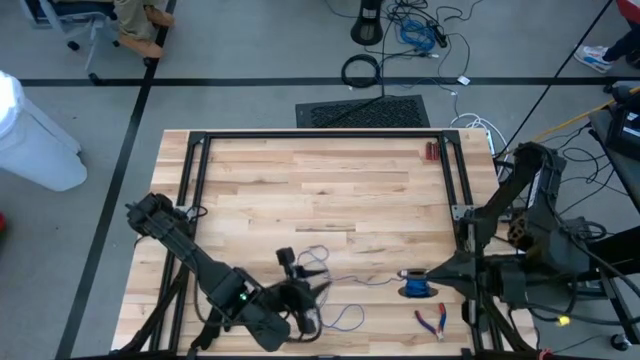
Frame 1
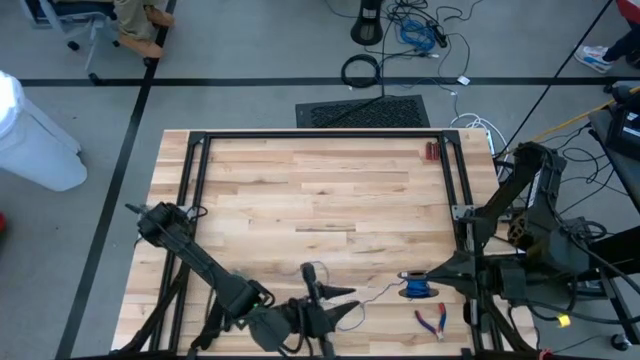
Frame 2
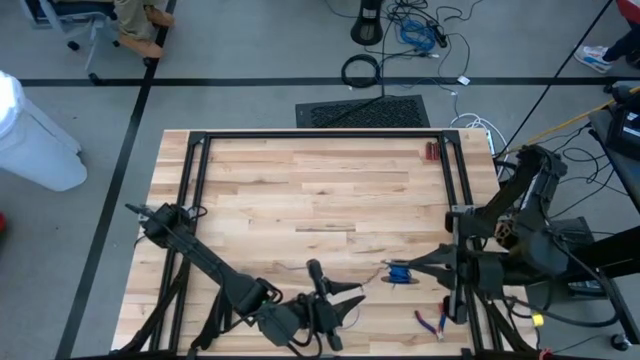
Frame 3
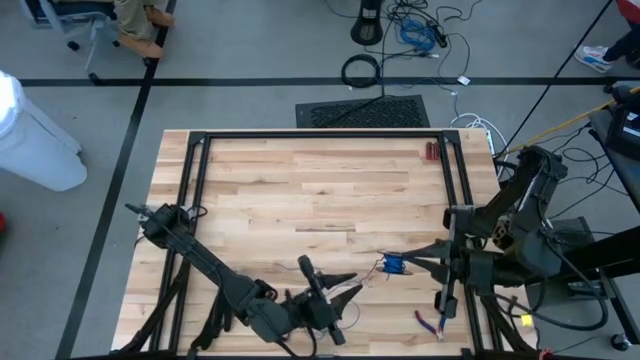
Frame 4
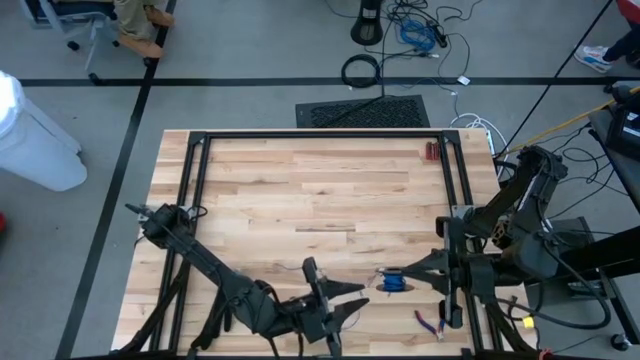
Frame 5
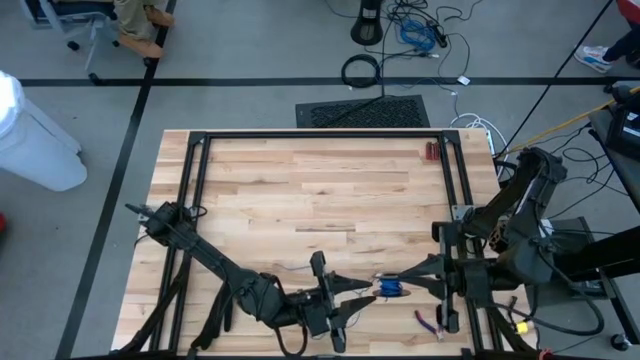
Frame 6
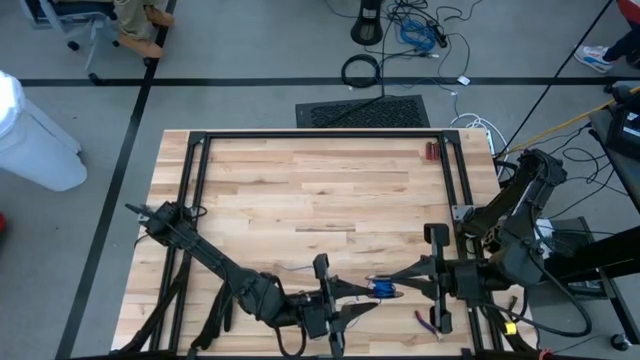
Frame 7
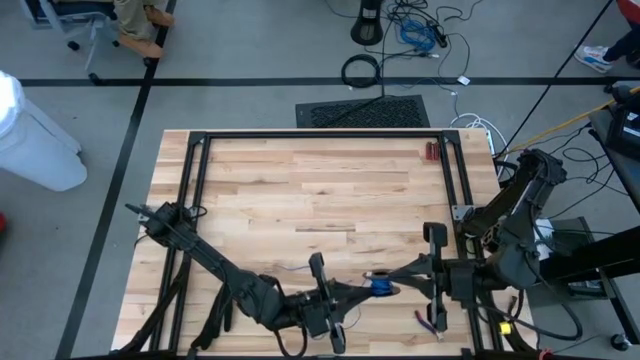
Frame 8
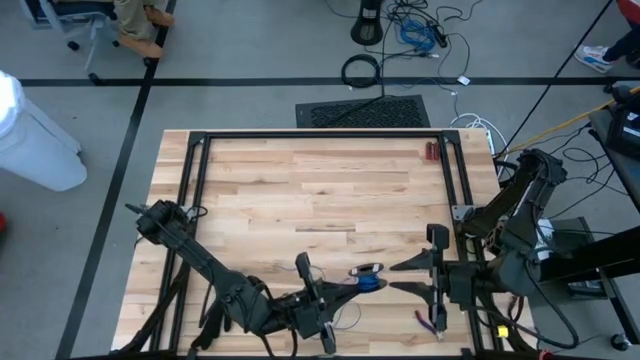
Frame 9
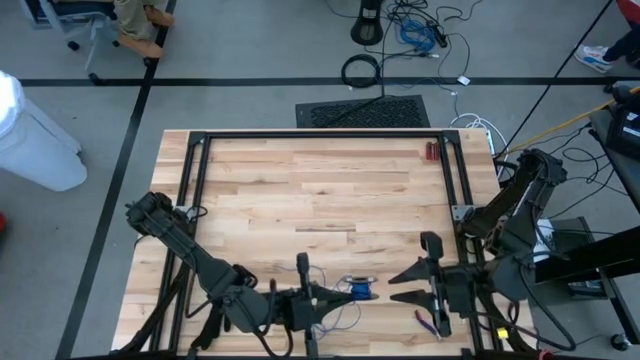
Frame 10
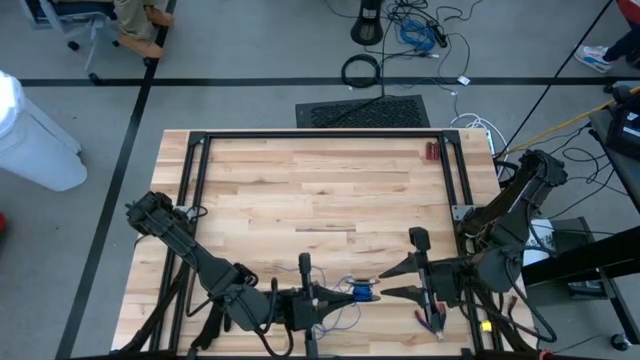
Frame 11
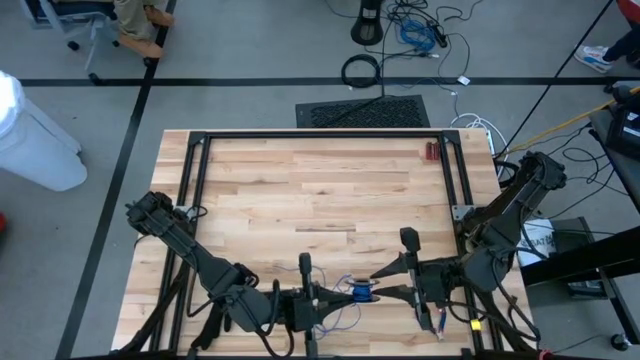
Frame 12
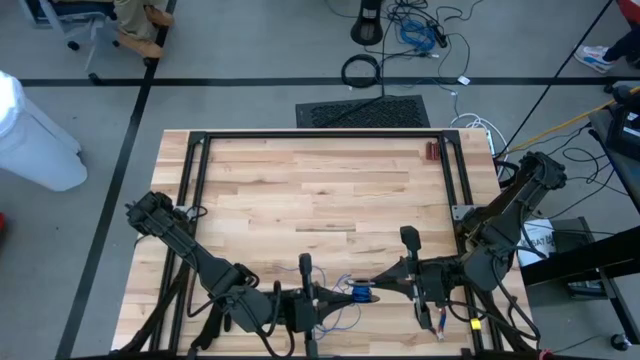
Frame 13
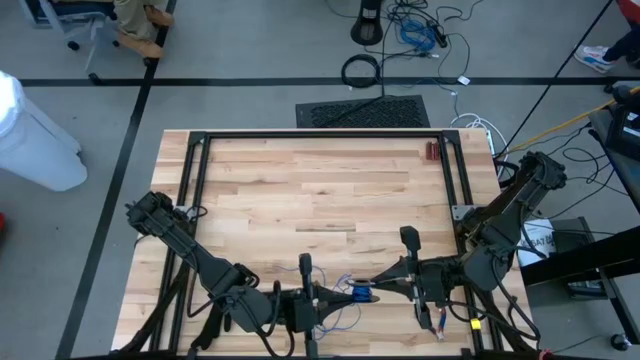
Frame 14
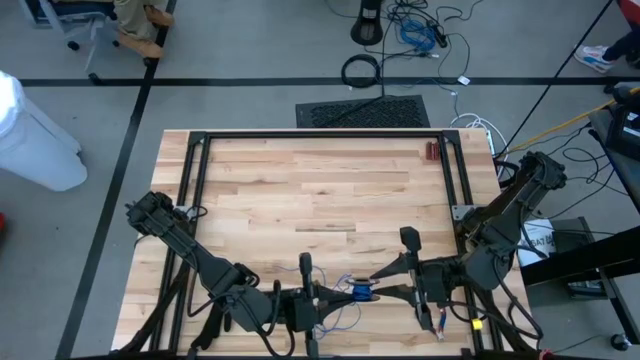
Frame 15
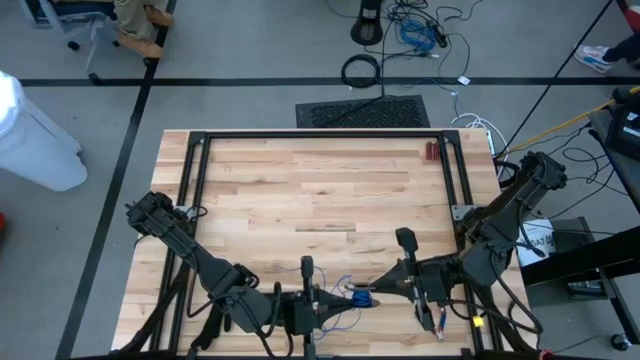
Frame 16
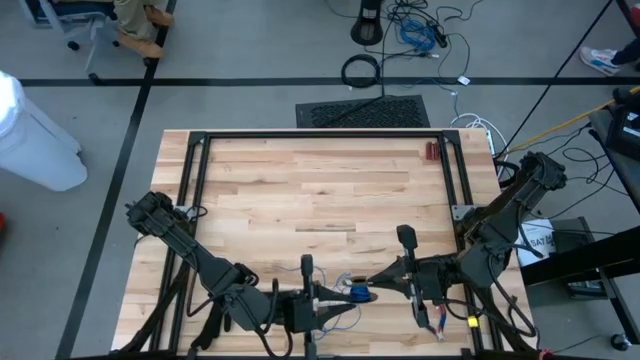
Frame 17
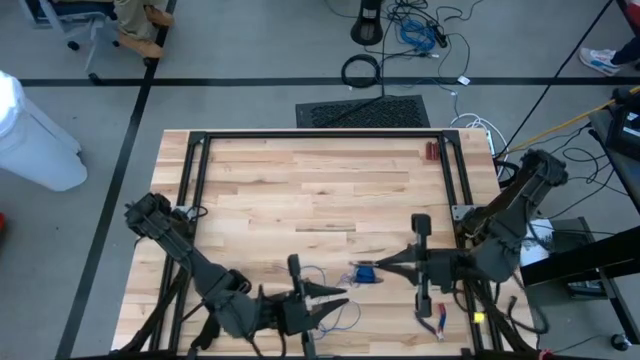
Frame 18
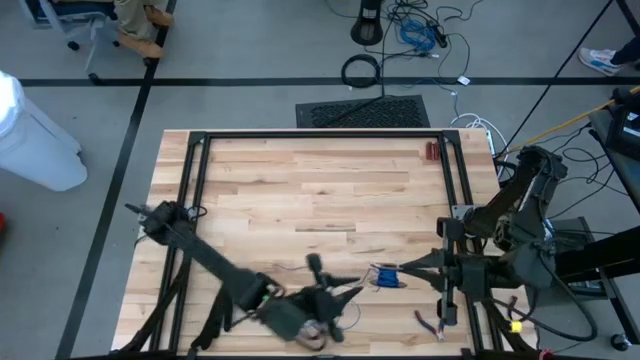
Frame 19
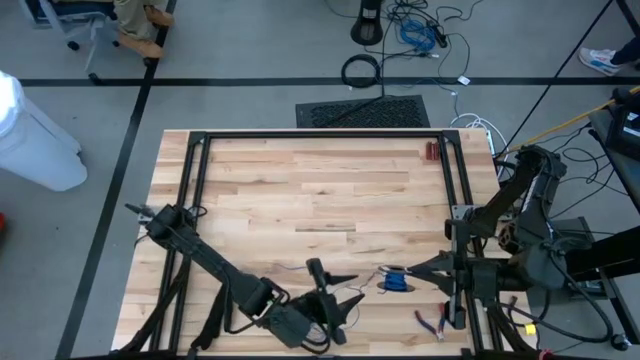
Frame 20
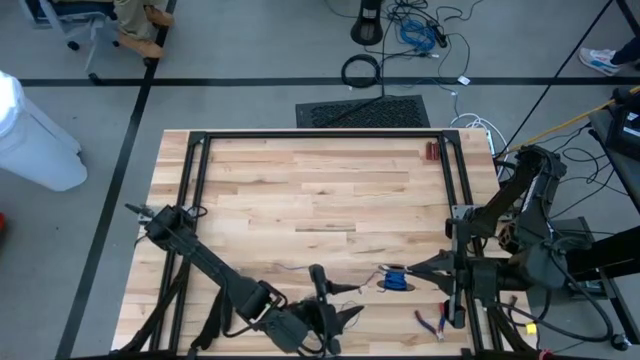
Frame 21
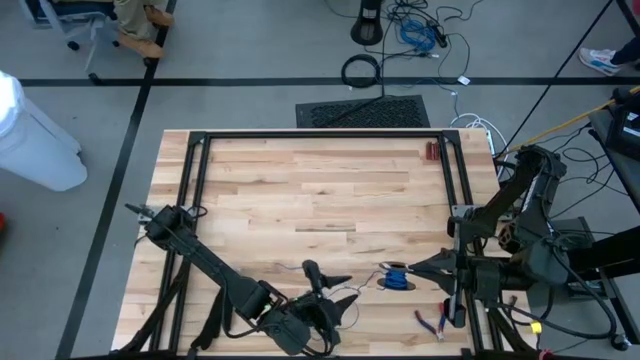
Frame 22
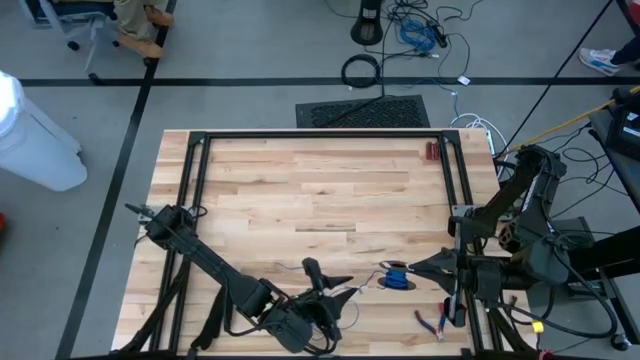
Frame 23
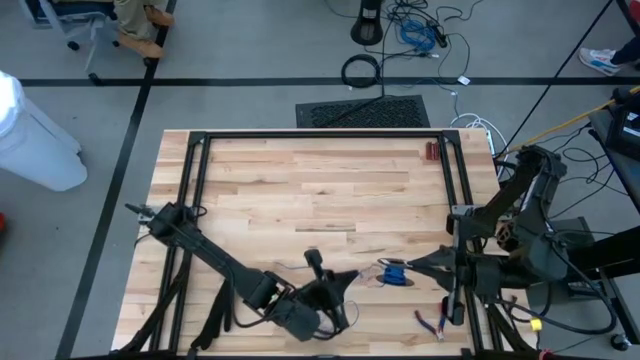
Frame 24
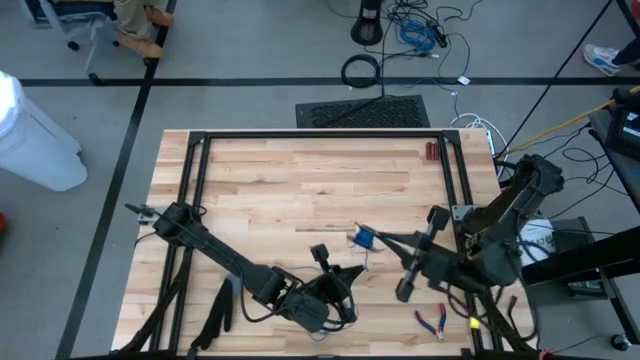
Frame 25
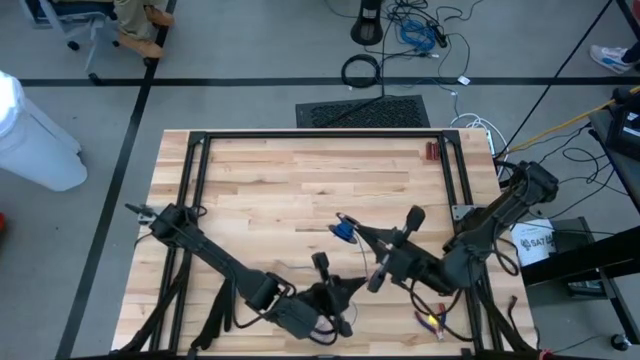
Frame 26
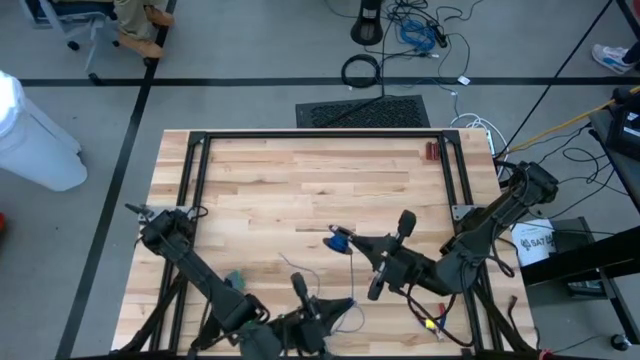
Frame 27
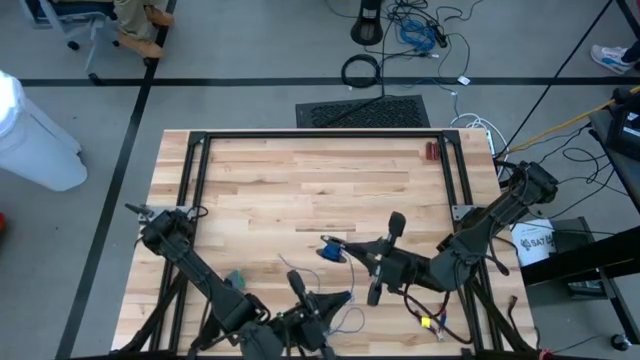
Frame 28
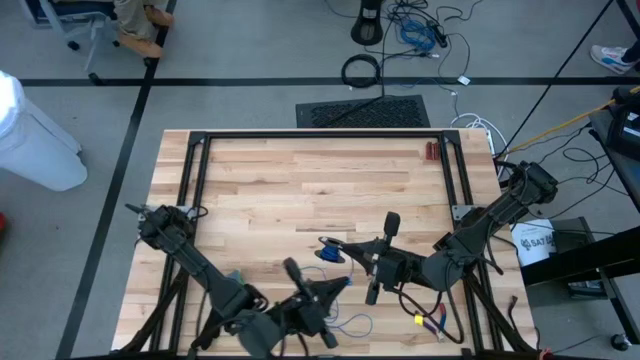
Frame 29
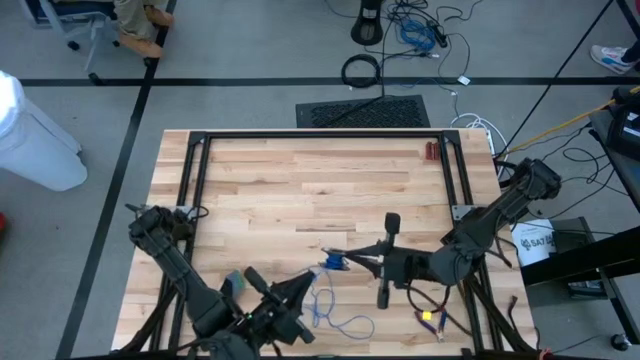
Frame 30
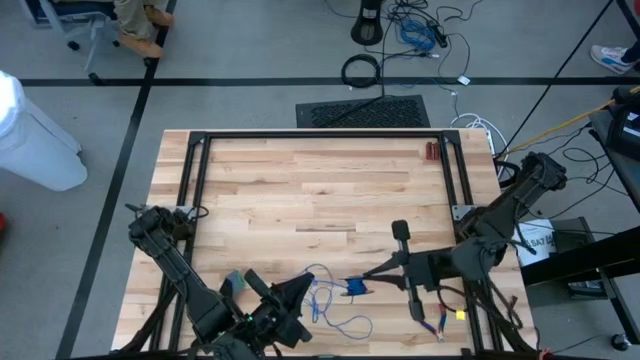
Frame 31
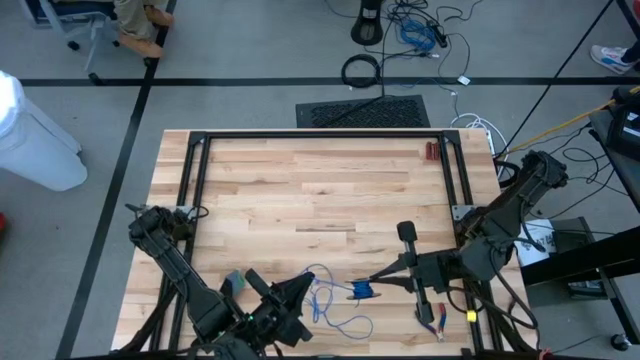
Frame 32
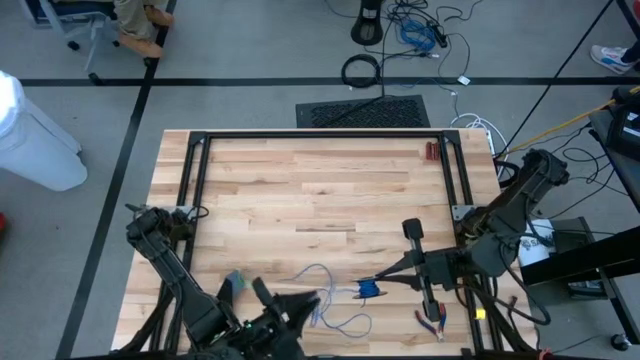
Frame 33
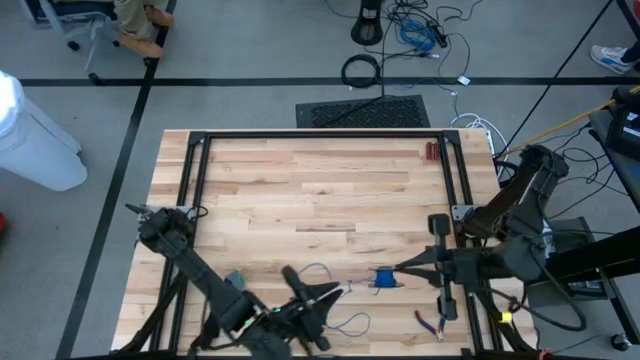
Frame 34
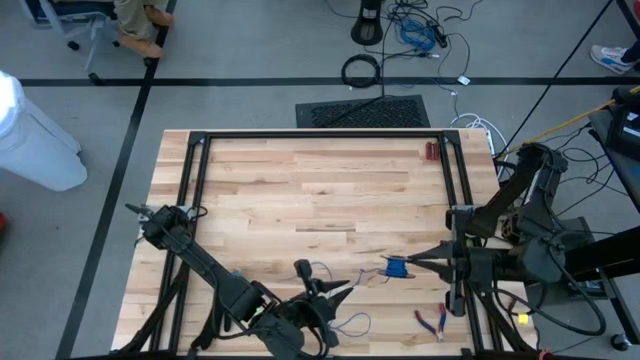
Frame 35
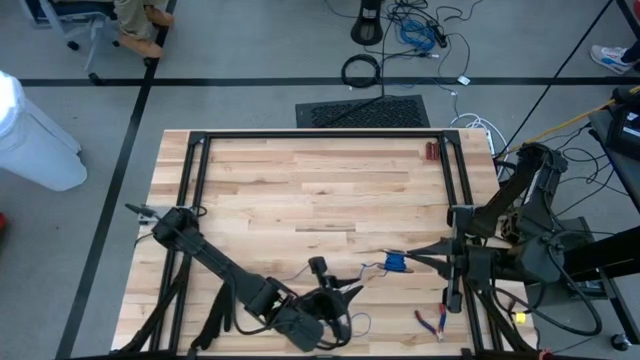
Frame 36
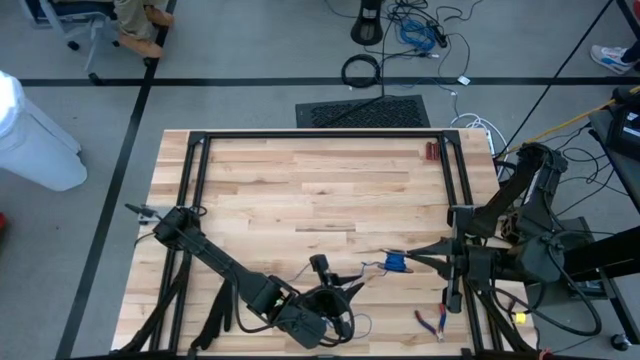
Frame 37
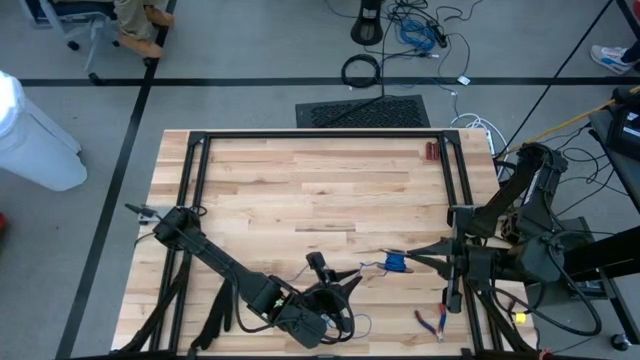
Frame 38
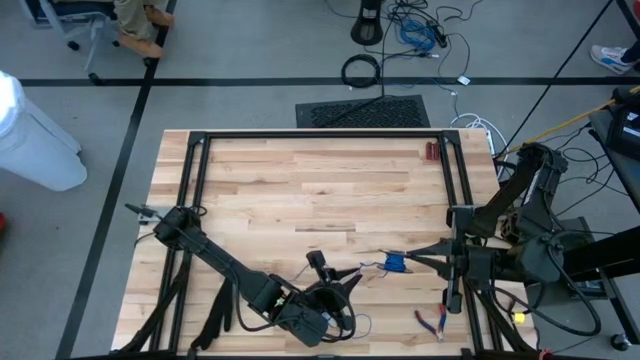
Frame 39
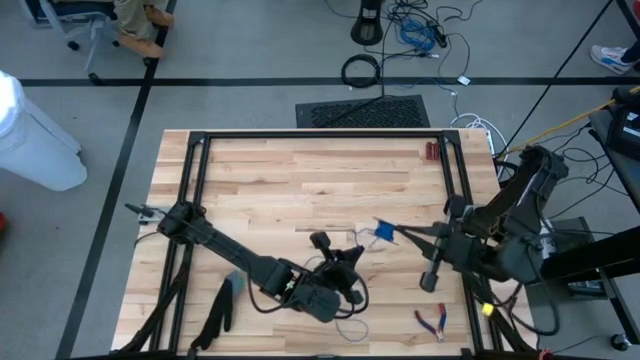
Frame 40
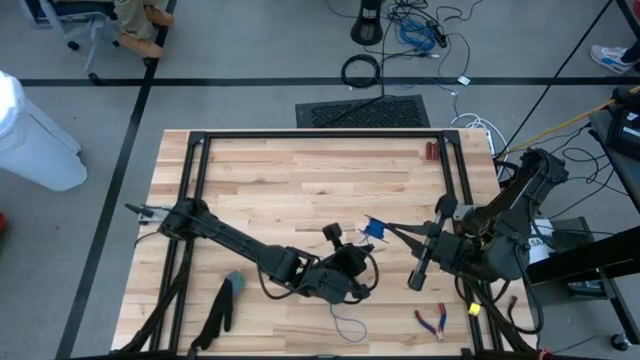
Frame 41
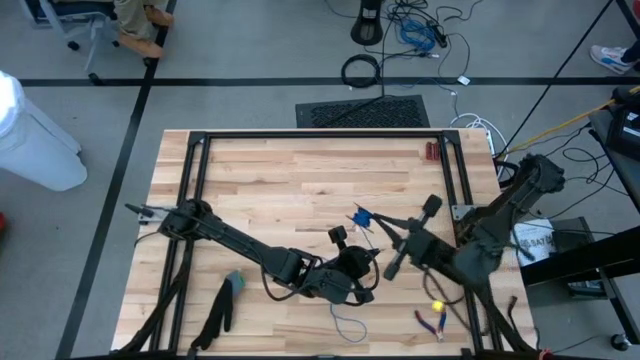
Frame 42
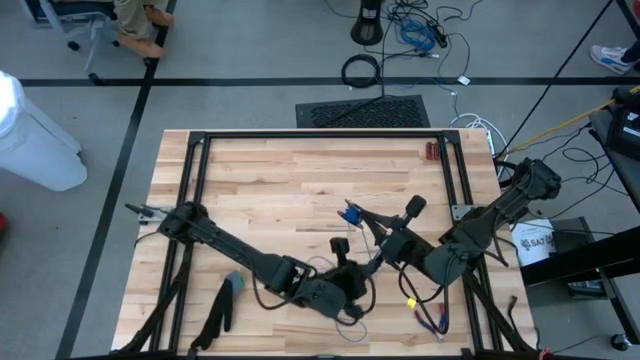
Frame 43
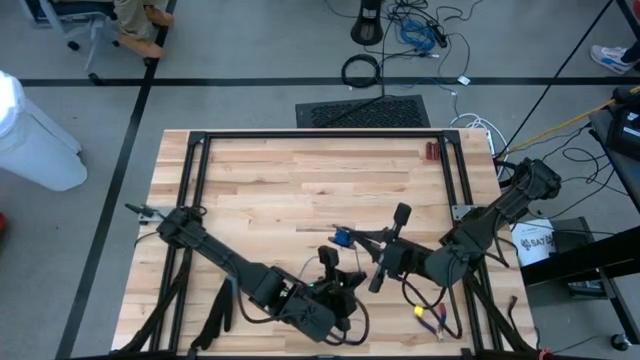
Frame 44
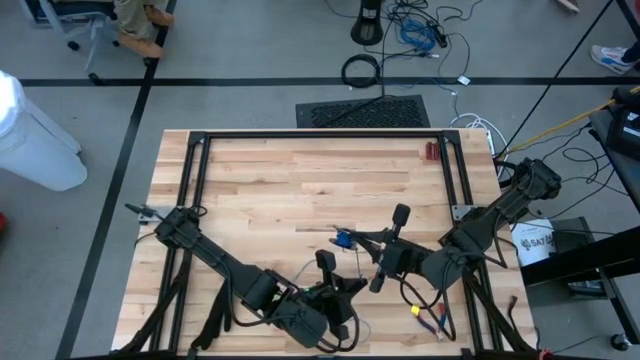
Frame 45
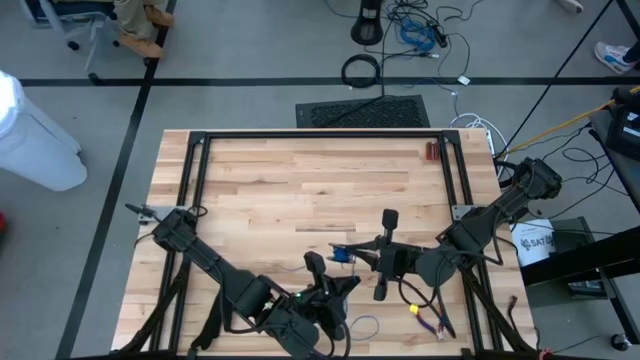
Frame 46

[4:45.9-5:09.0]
Task: Coil cords
Coil the blue wire onto the black spool
